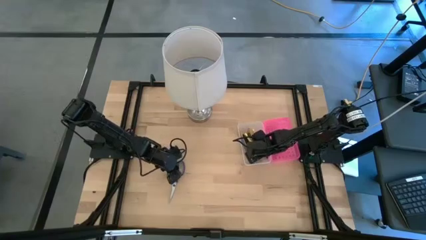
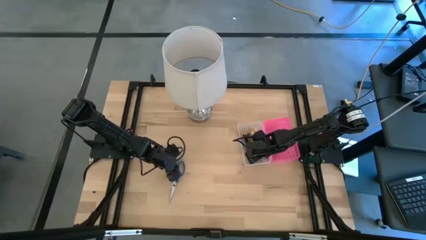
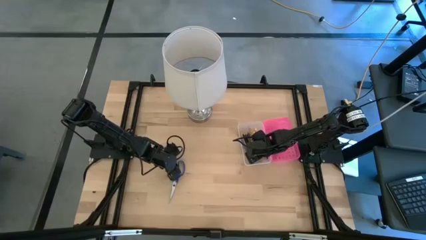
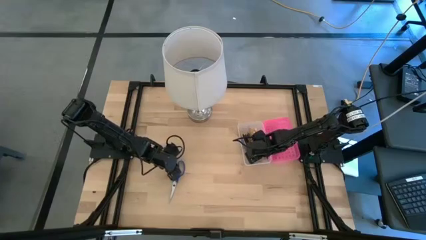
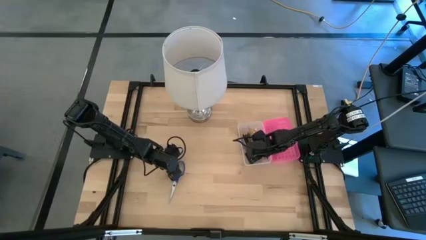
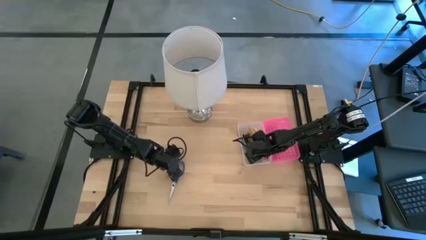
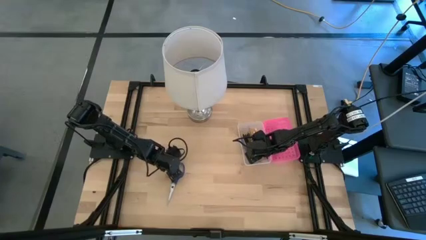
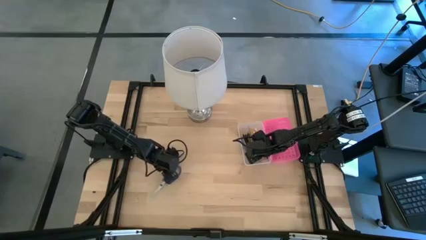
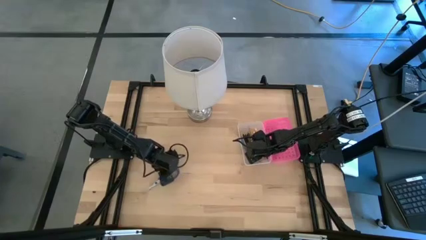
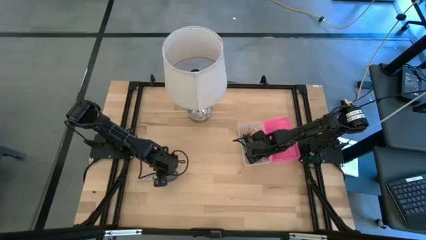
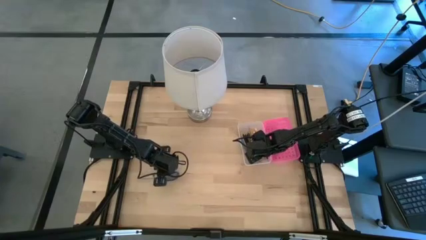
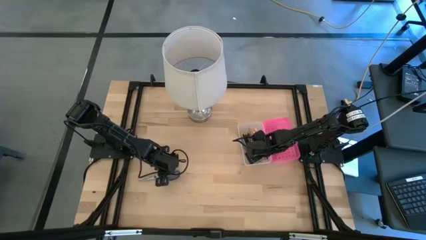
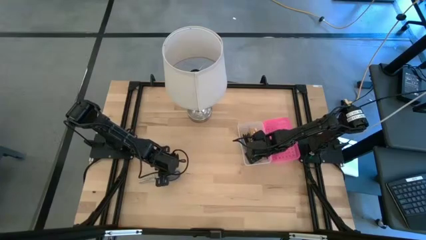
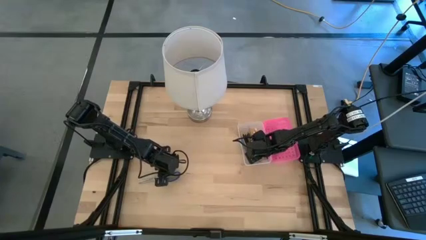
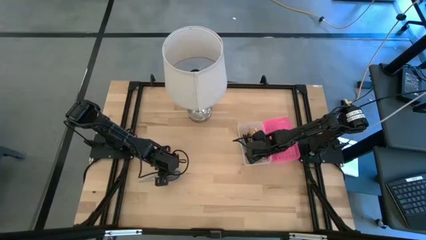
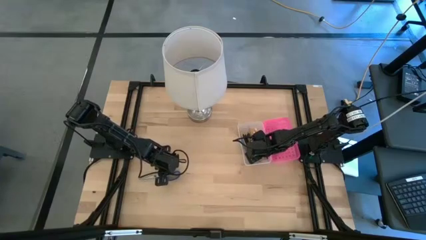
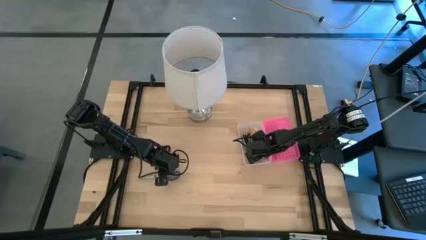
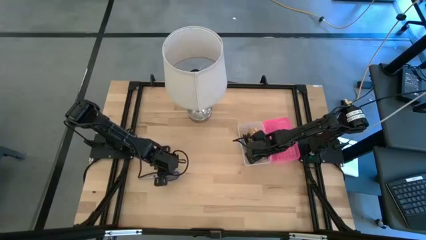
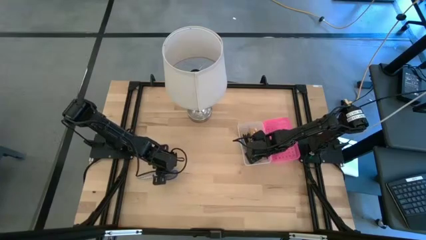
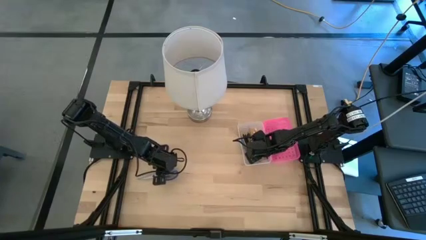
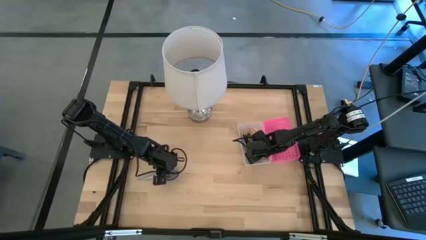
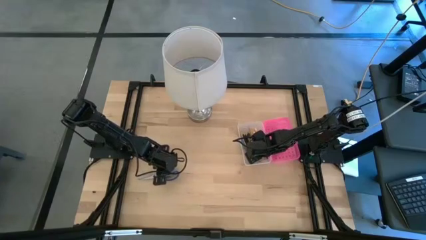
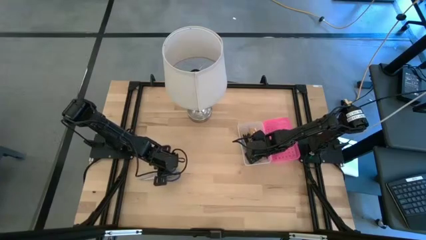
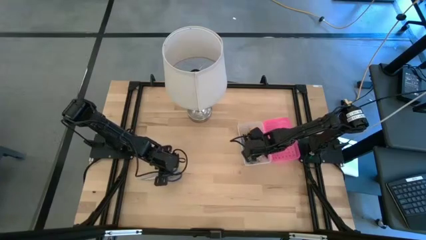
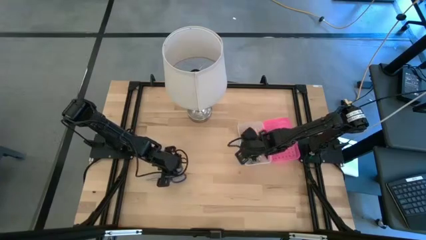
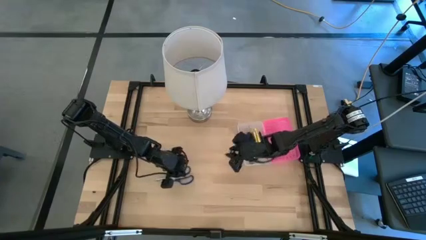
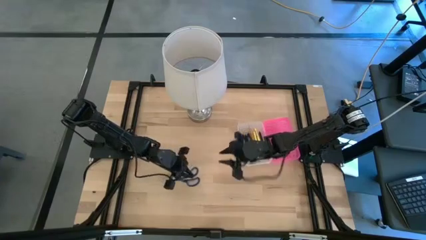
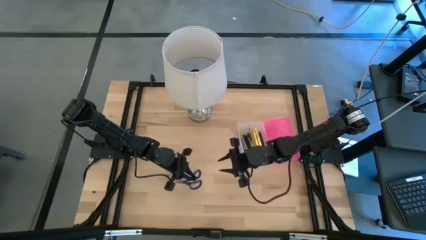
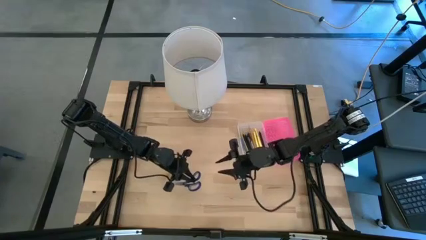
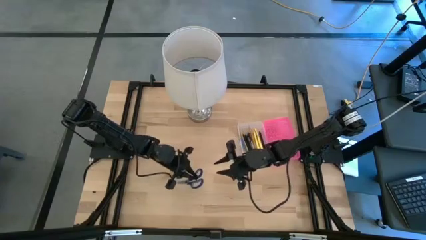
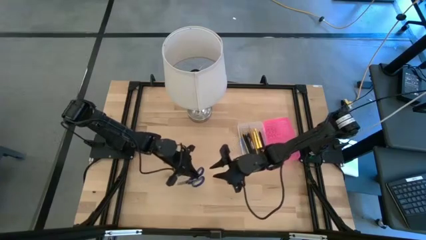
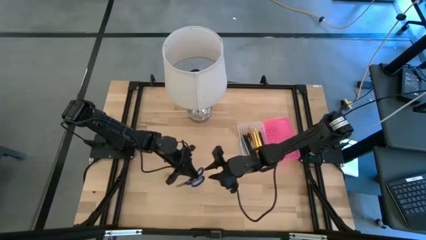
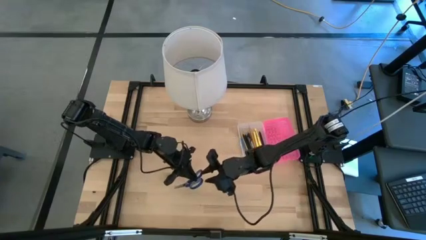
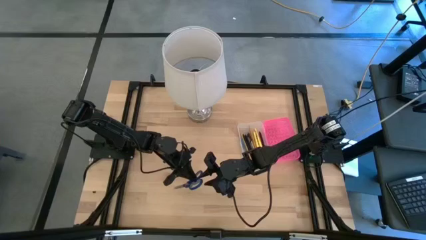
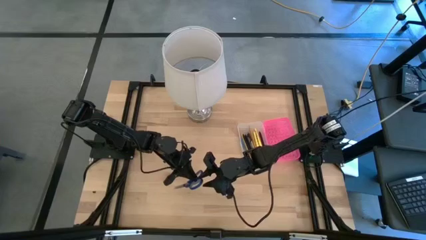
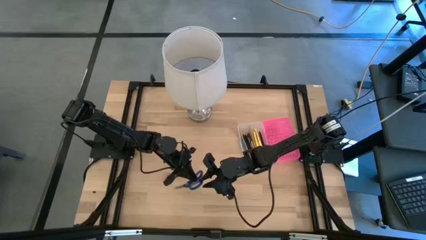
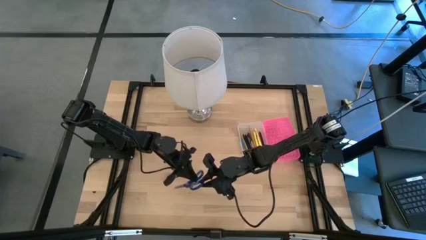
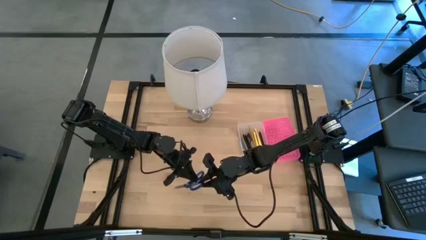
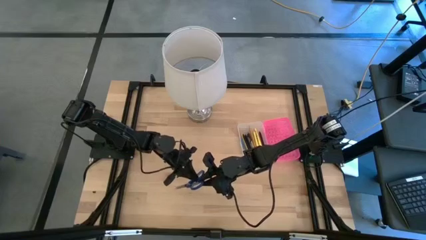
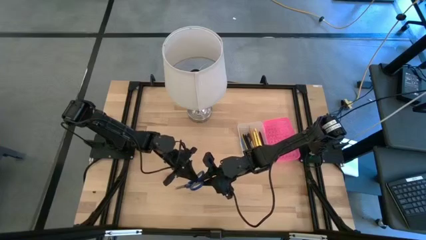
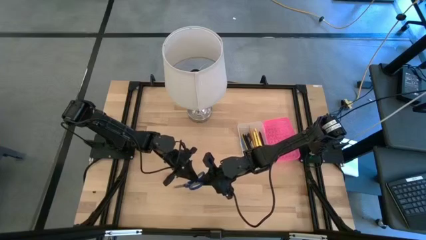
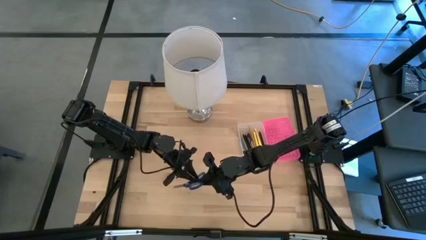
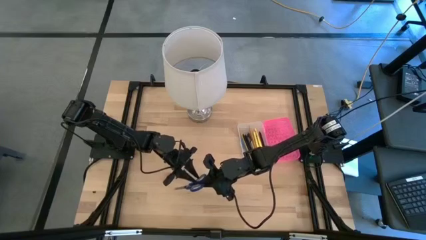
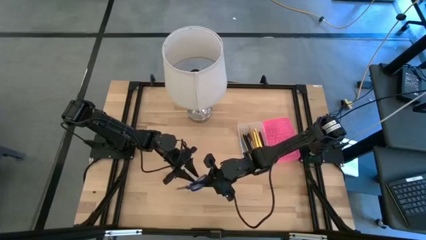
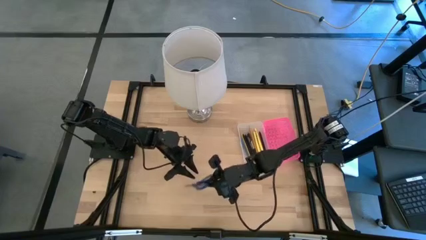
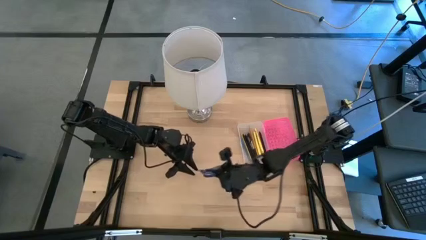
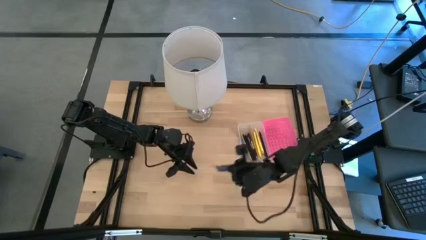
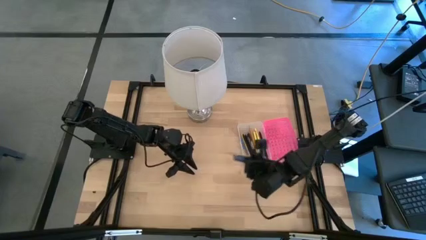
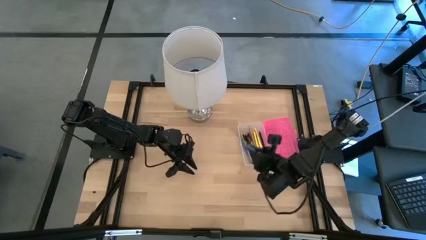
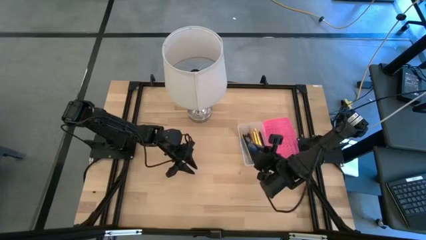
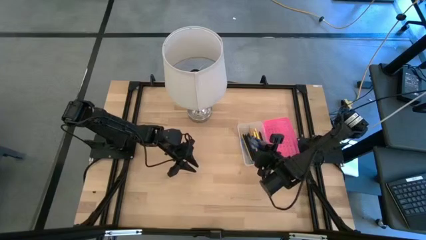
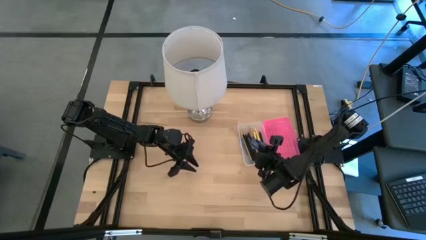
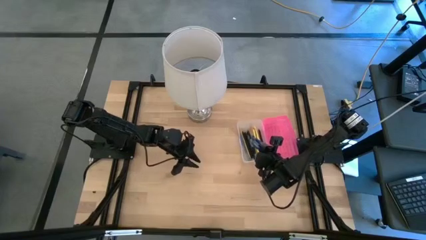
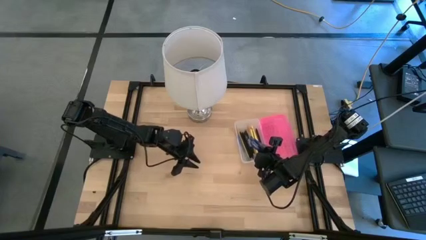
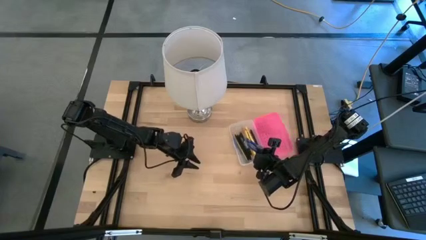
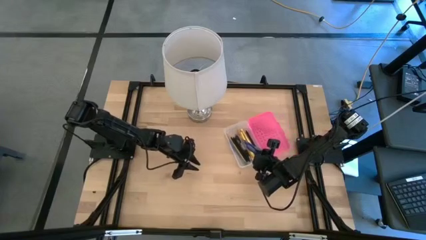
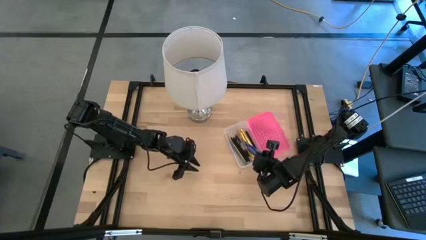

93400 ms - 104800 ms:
Task: Pick & place school supplies into a supply box
Put the blue scissors into the supply box

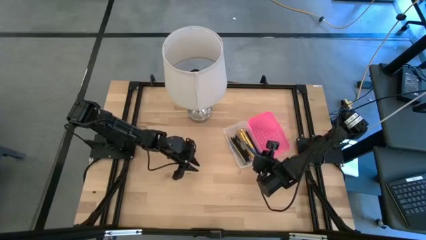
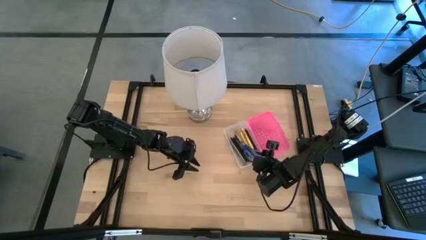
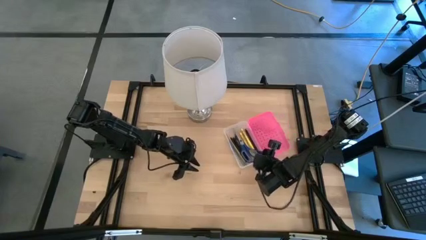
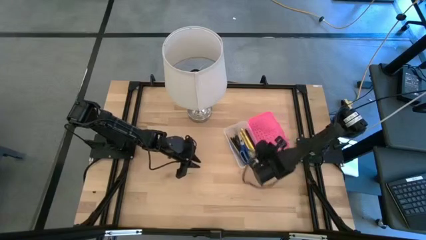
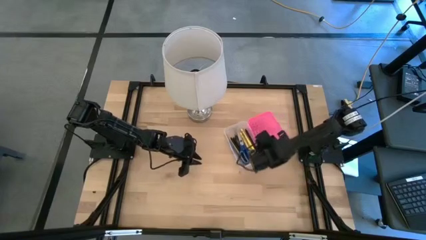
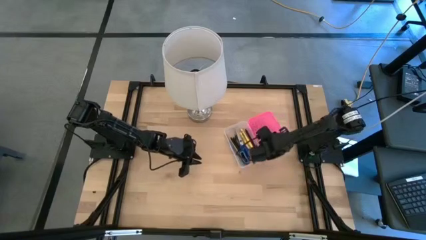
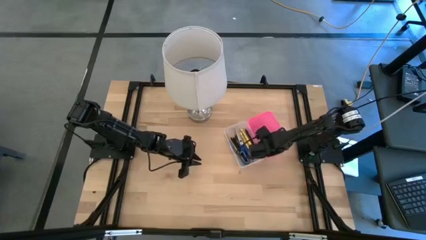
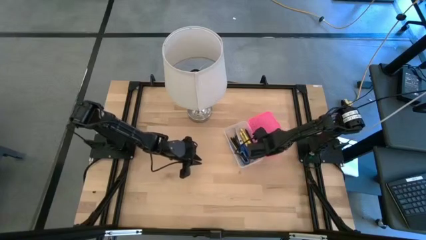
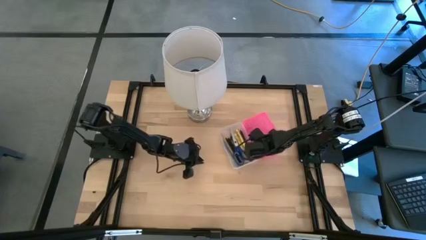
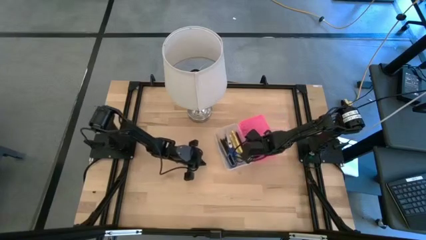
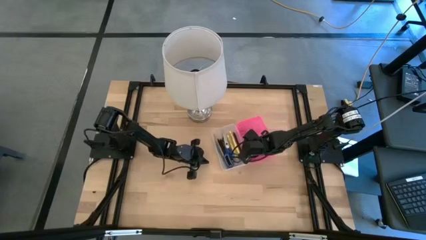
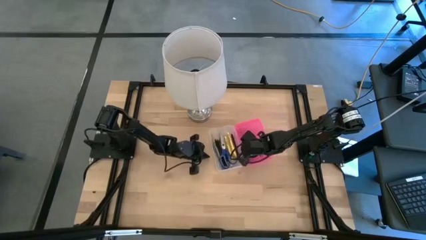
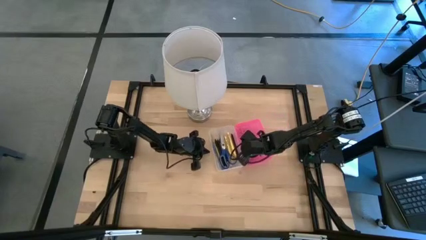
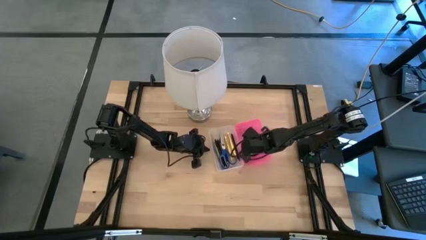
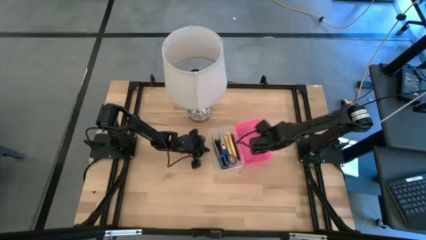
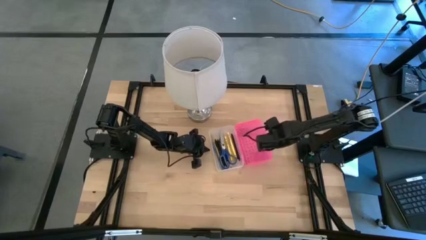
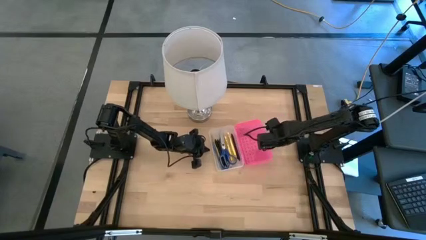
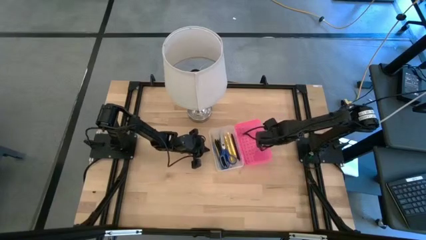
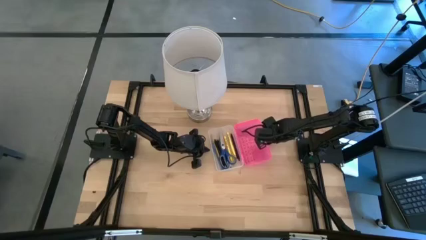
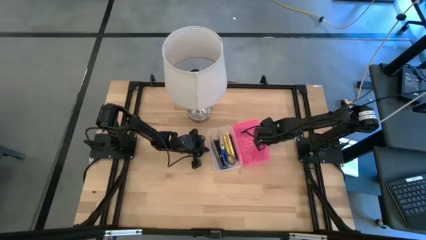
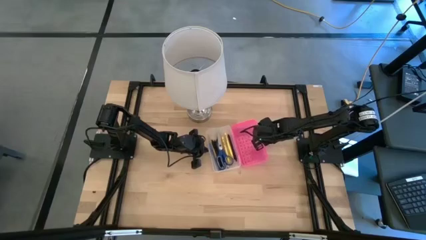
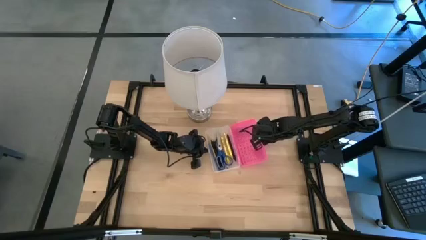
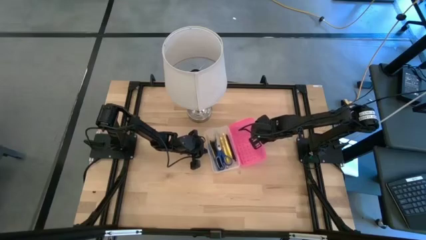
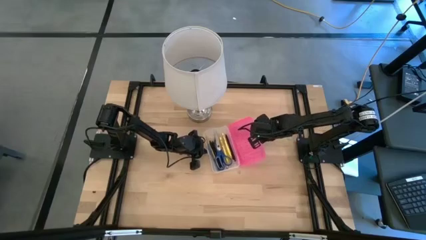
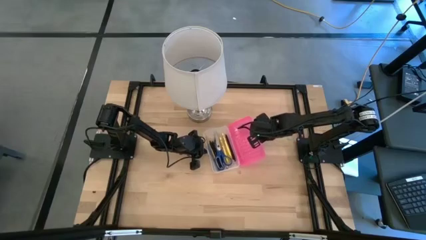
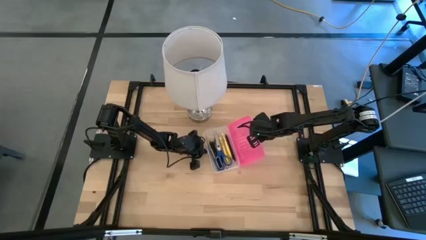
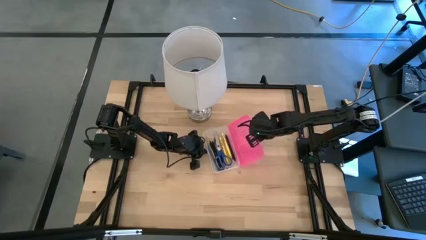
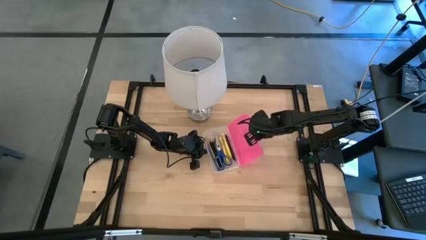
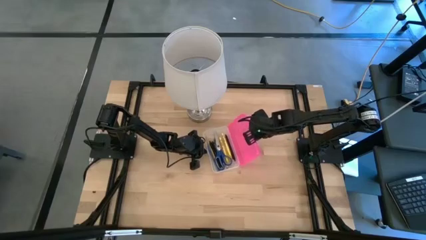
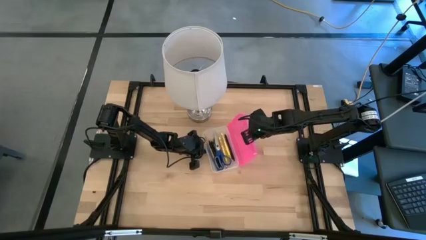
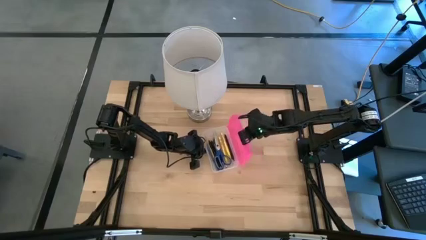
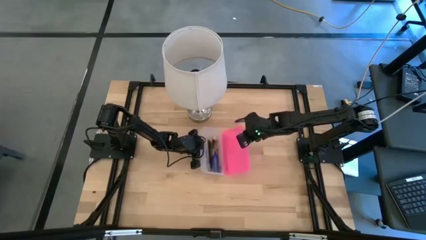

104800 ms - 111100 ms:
Close the supply box
